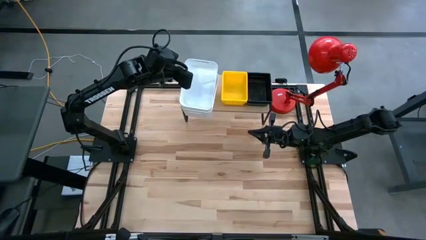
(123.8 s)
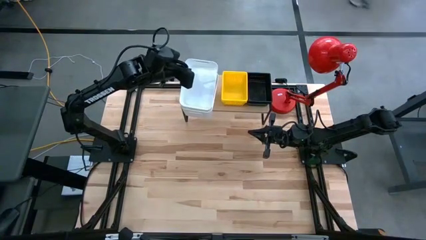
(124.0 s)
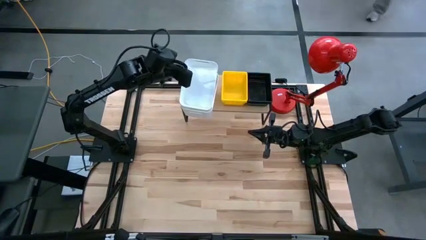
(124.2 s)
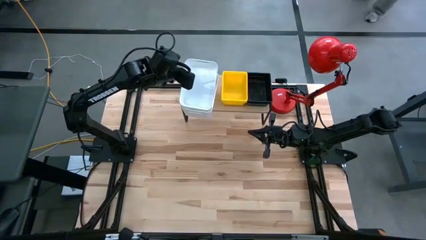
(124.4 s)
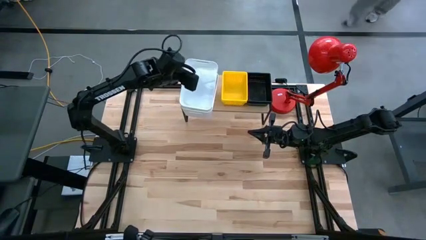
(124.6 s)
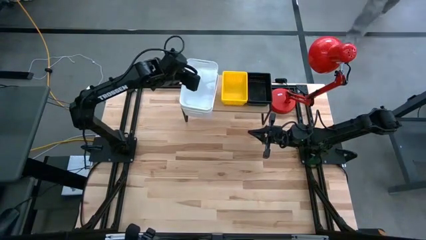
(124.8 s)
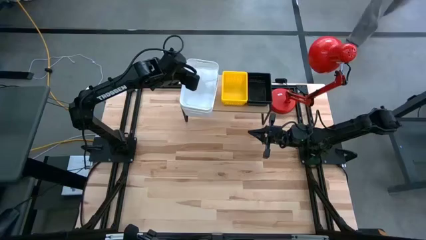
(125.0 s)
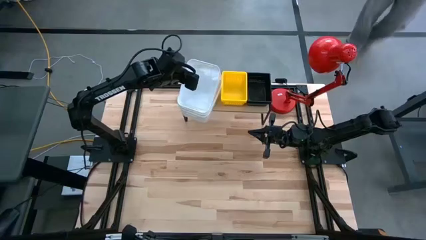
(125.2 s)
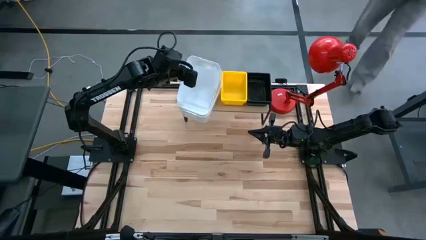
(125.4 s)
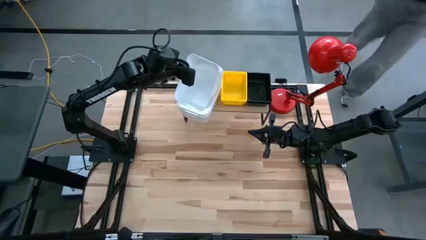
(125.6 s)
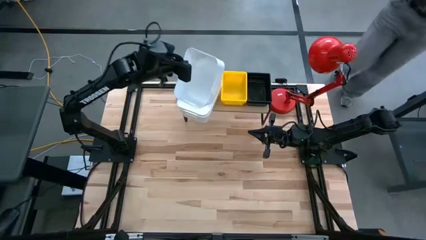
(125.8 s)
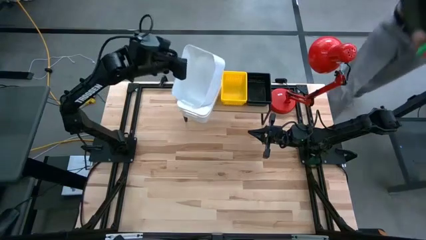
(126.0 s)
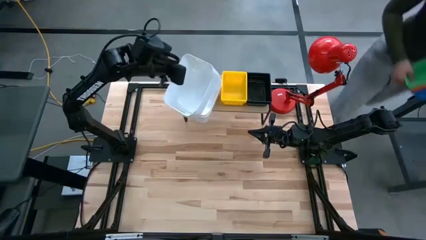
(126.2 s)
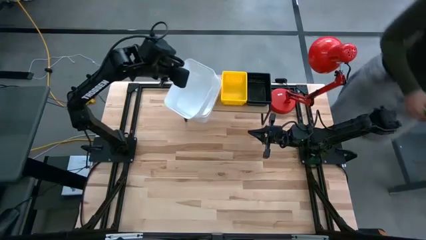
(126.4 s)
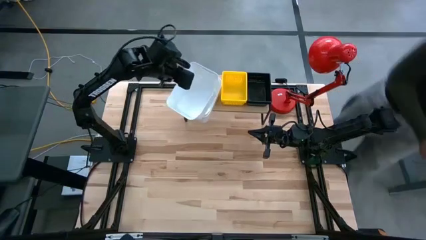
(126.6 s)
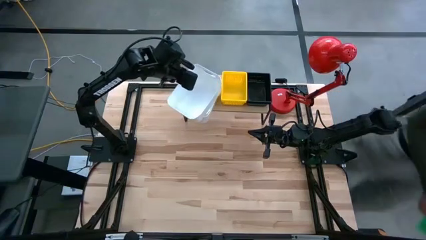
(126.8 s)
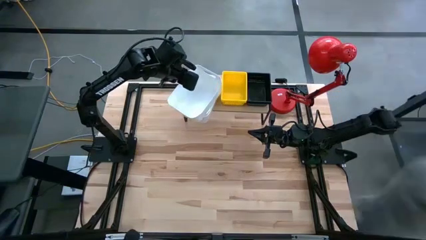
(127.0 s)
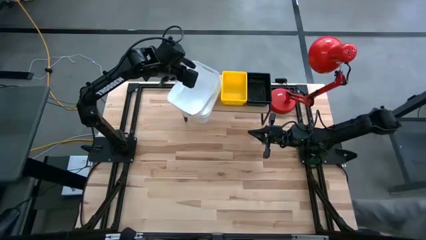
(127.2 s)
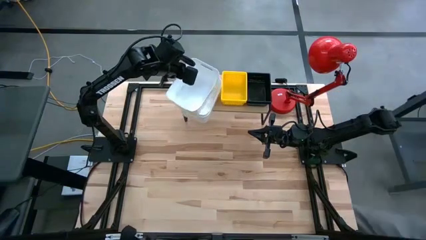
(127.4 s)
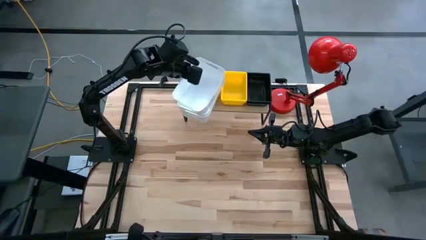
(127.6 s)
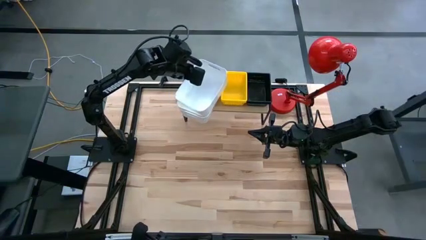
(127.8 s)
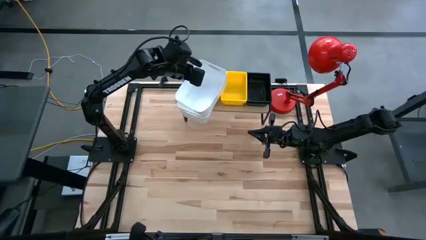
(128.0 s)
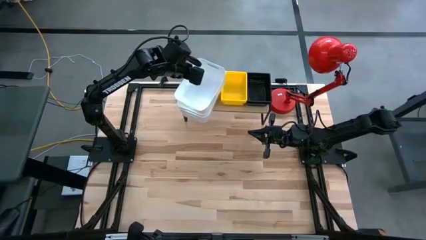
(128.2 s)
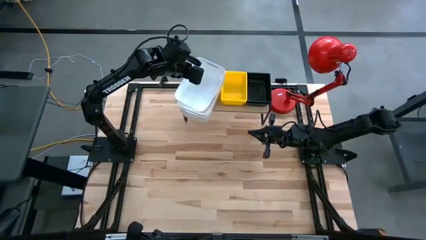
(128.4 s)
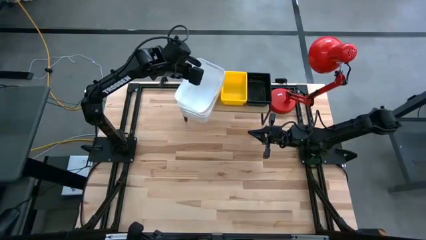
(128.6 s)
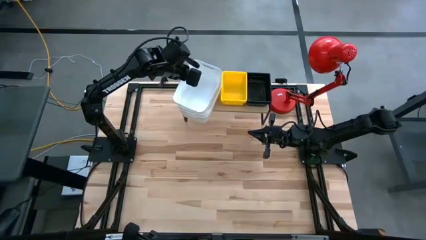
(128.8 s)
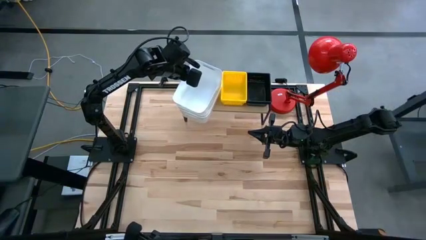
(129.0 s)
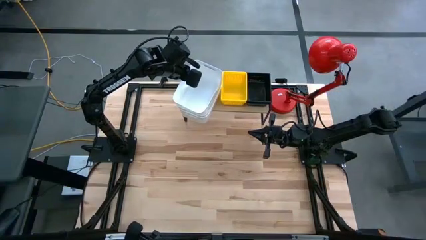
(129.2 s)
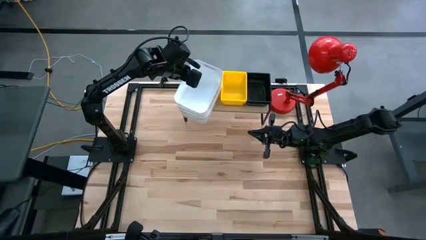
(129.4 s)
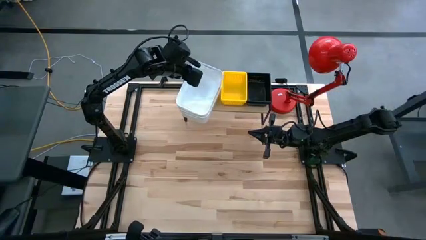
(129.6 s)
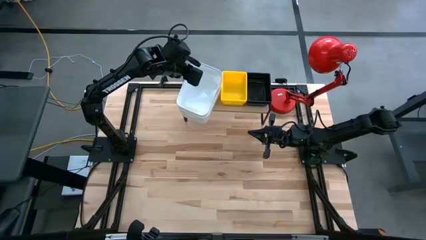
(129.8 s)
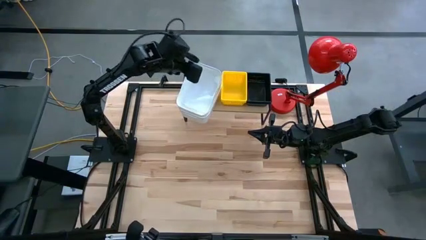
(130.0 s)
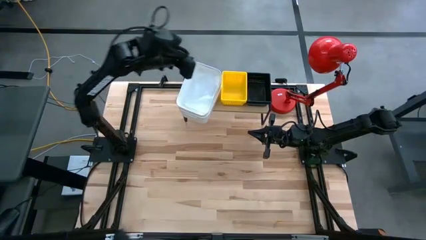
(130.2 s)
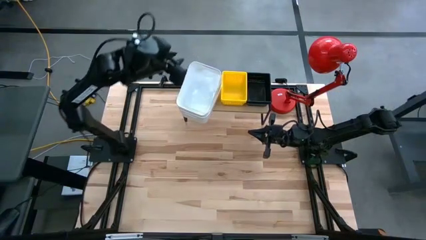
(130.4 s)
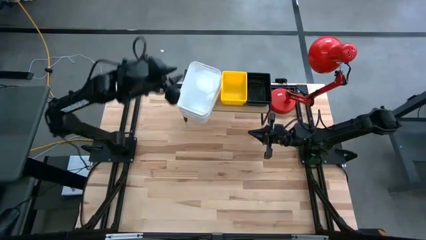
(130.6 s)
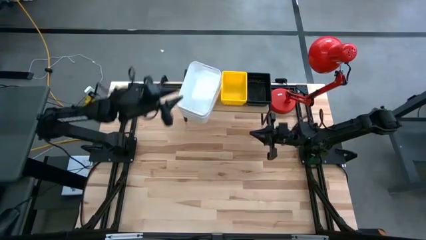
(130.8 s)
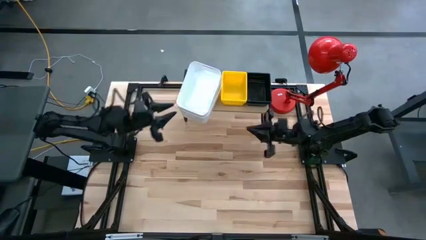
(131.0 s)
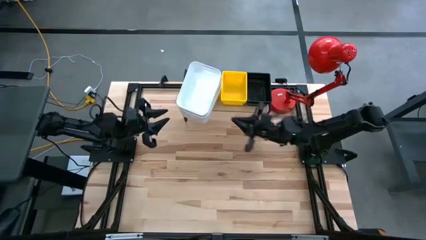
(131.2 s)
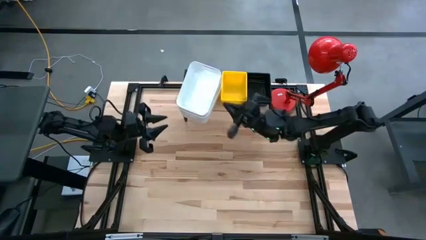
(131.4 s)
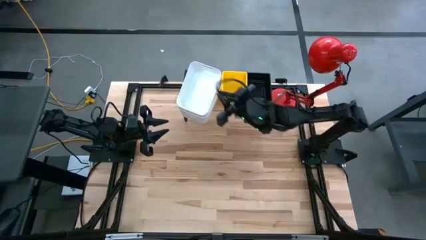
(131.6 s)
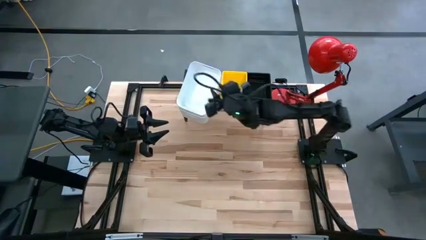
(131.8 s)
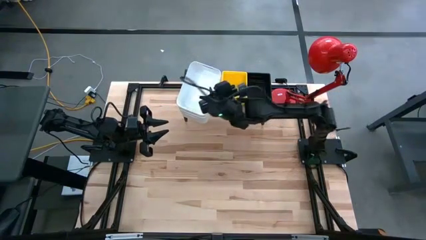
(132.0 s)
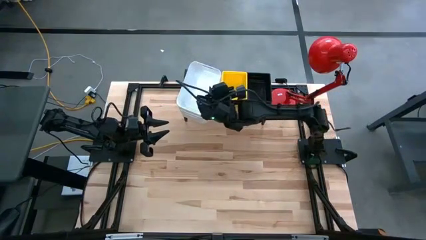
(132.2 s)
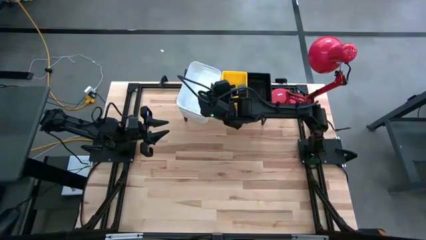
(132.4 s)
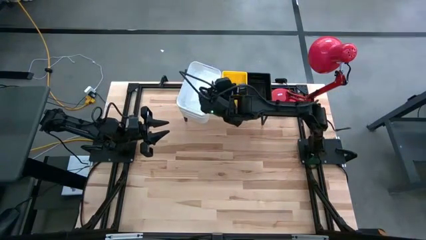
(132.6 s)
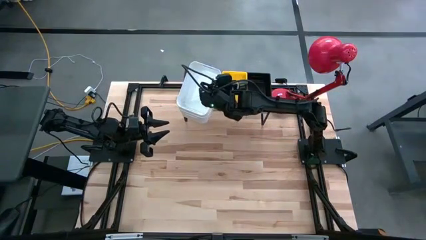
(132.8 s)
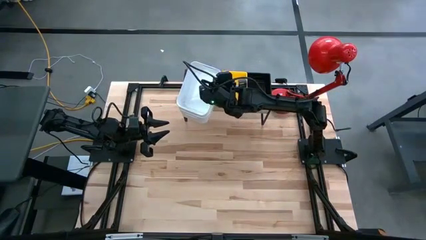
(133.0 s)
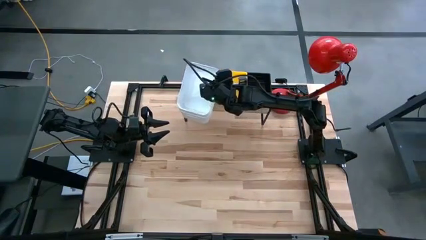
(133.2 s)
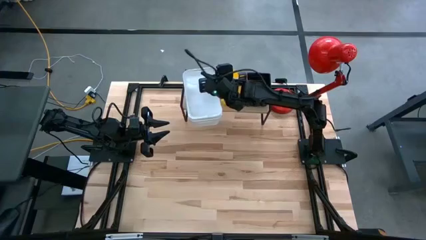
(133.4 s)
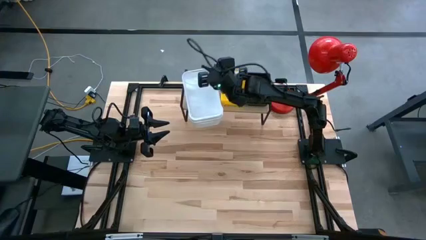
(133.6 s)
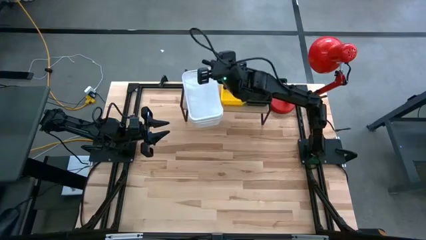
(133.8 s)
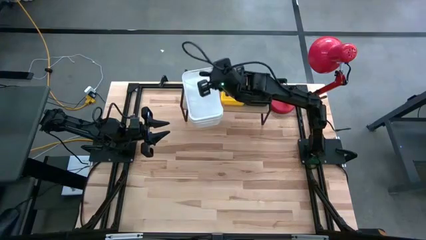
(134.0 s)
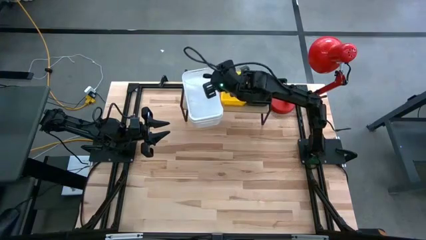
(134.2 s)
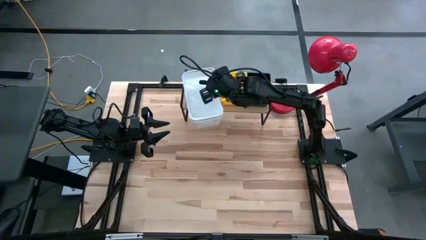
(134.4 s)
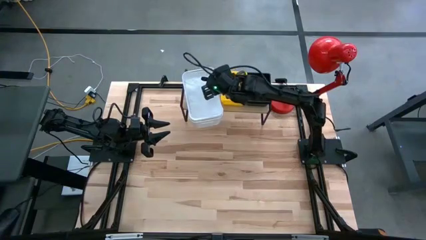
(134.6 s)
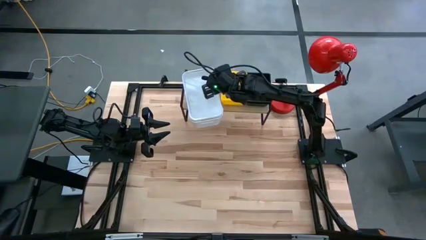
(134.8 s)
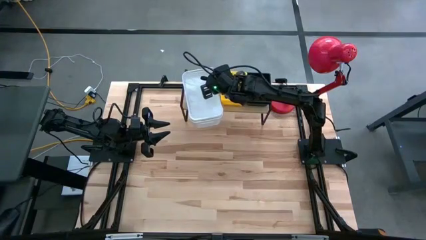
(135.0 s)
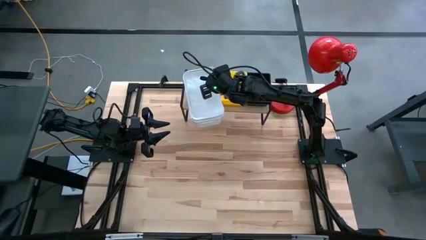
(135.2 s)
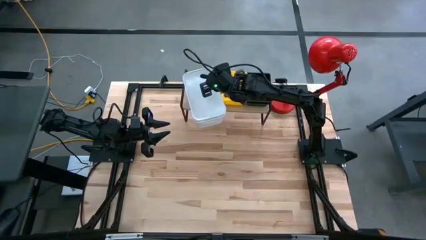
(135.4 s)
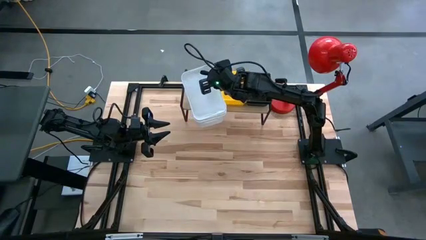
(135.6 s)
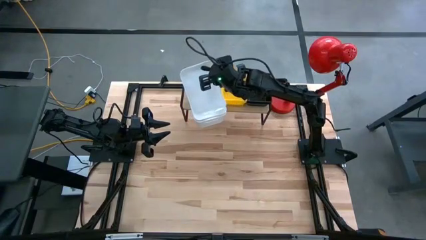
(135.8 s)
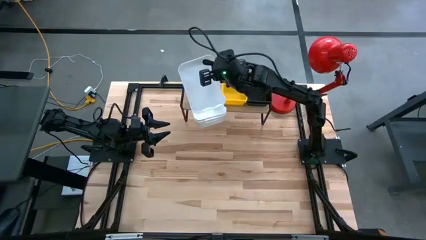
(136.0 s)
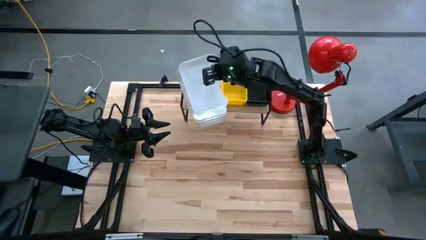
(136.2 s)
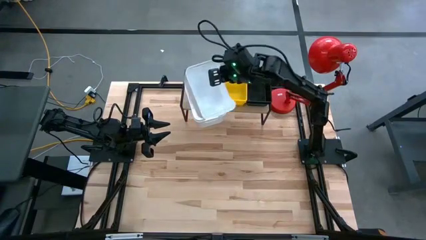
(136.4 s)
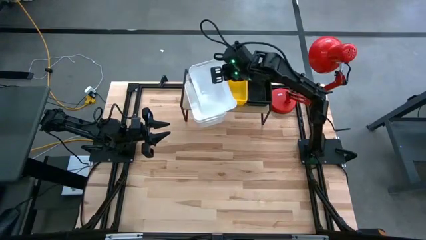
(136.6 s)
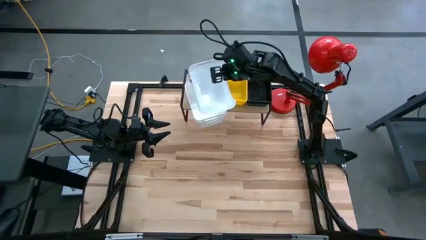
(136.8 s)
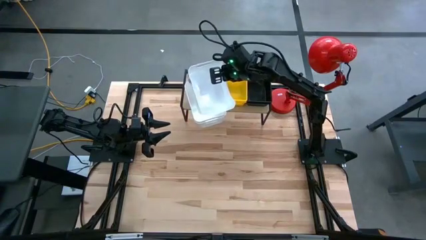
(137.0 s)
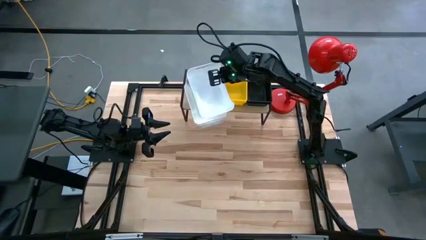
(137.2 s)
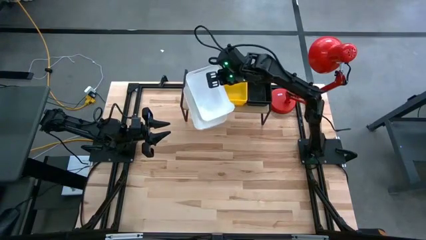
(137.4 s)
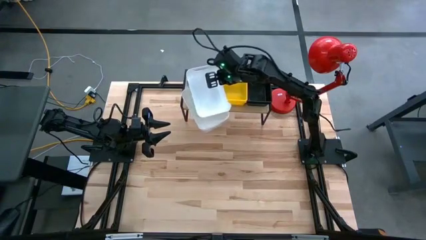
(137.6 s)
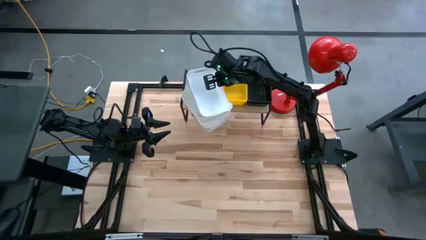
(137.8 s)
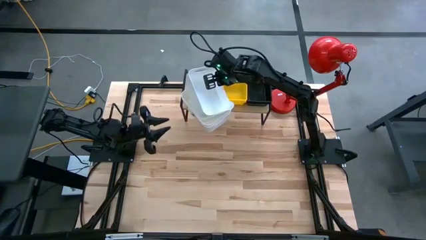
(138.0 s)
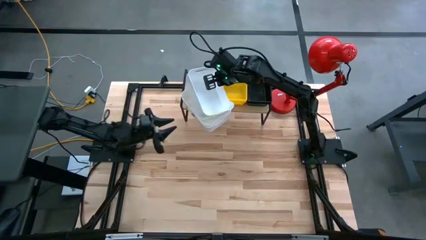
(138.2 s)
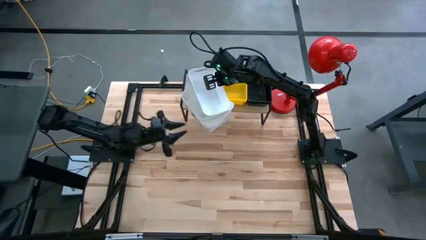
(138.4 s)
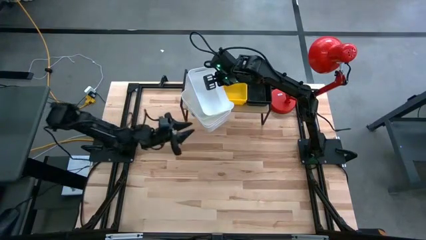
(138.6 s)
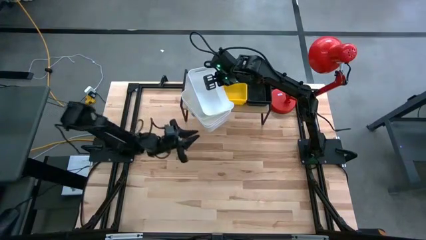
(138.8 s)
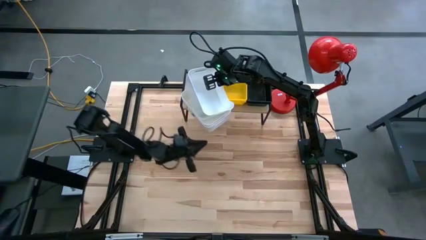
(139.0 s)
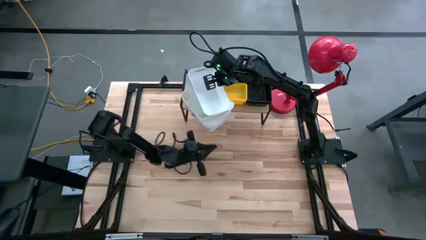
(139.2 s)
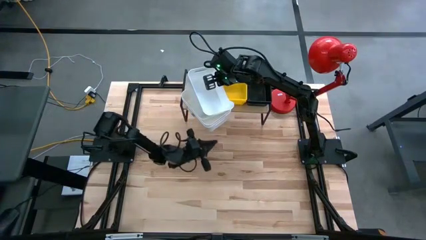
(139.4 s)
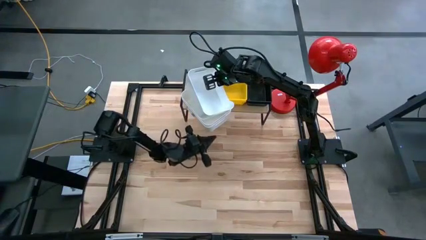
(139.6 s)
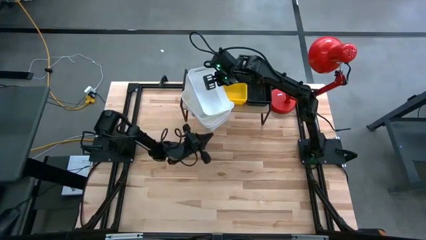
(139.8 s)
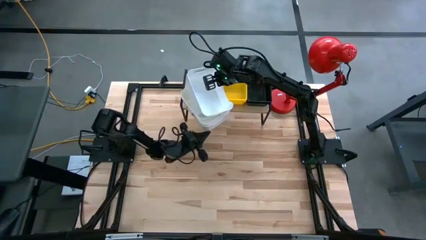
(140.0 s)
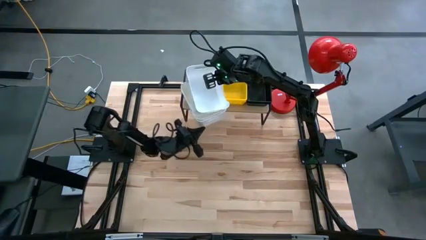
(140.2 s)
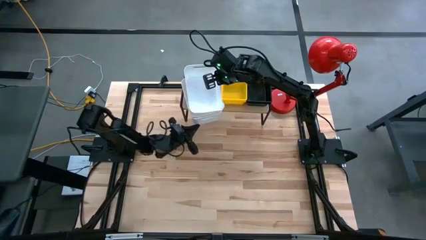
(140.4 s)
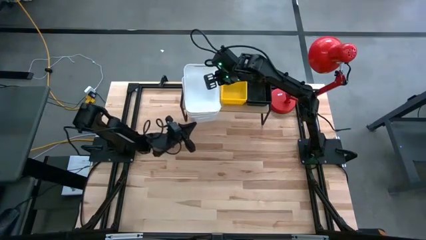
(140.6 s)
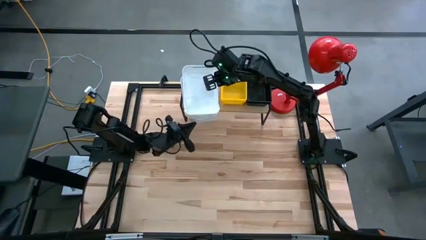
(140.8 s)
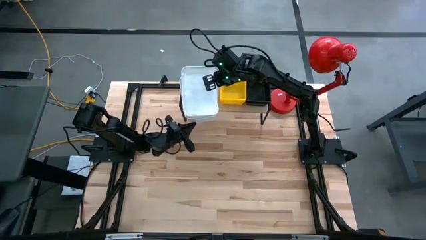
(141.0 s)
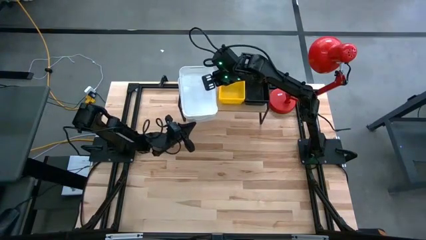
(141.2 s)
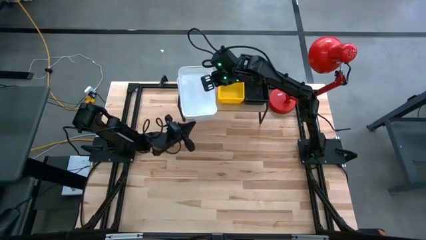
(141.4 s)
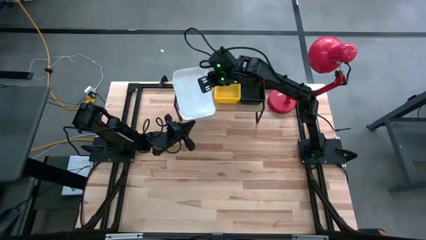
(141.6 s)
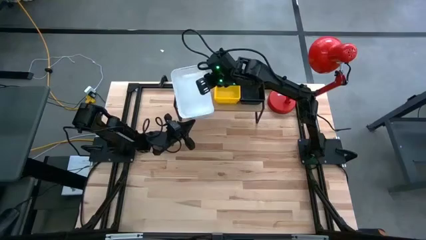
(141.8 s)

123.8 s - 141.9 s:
Task: Stack baskets on shelf by color
Stack the white bin into the other white bin on the shelf
